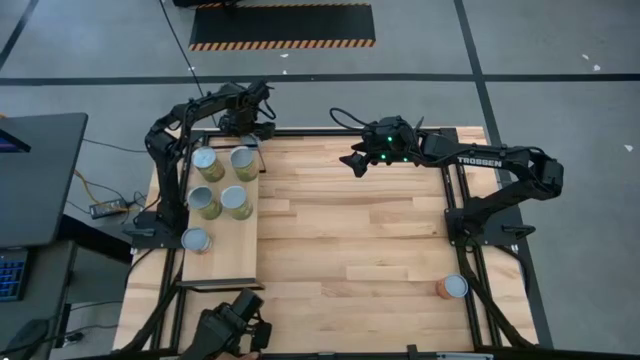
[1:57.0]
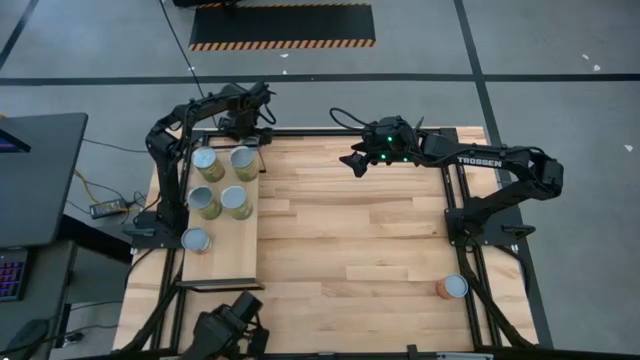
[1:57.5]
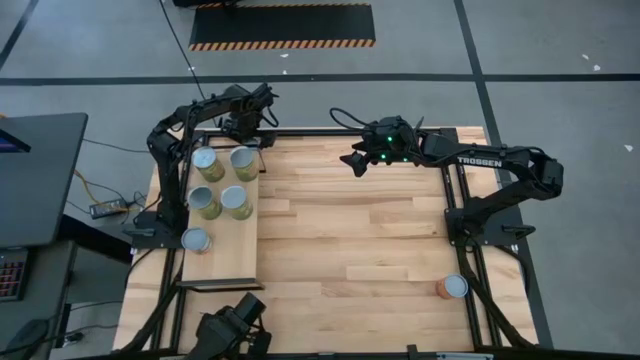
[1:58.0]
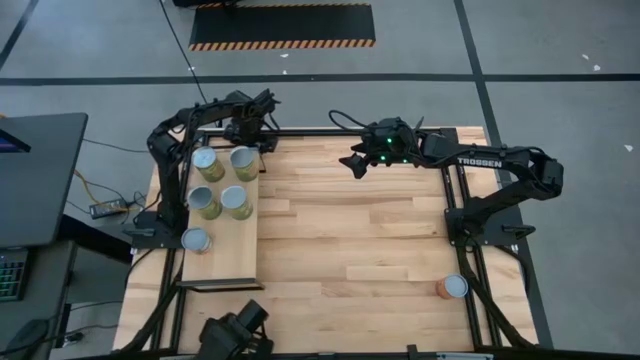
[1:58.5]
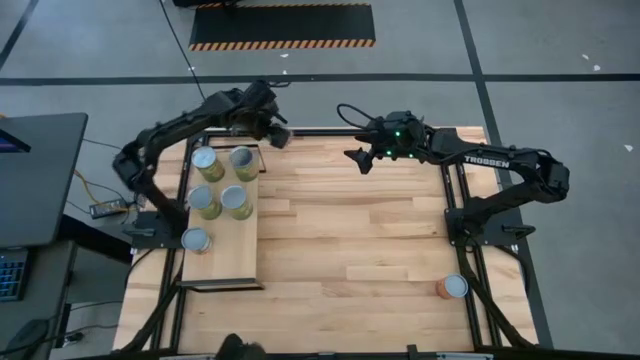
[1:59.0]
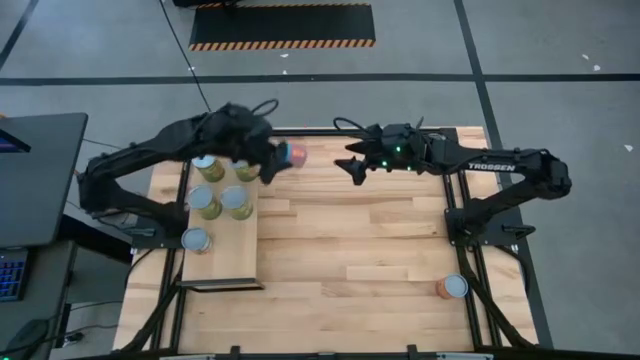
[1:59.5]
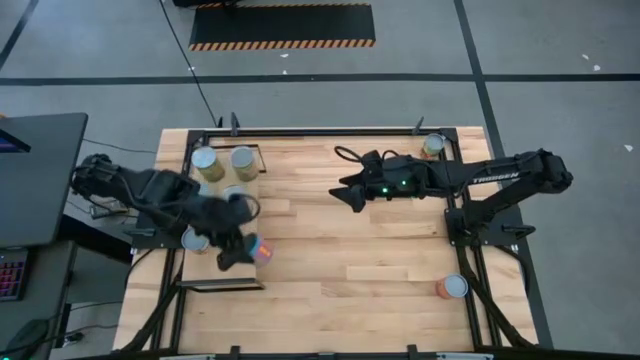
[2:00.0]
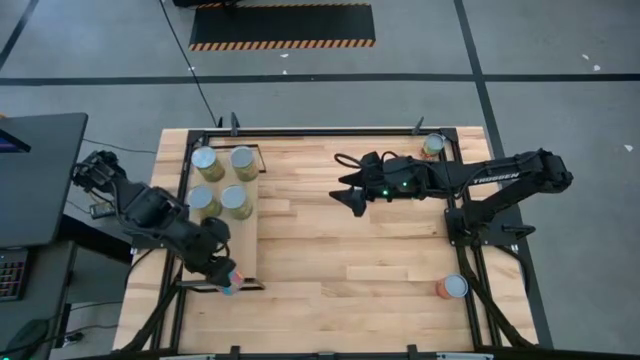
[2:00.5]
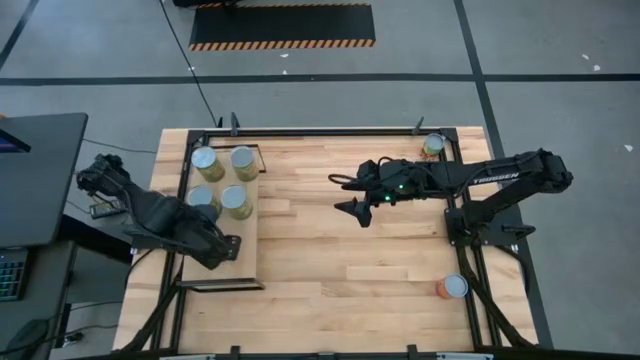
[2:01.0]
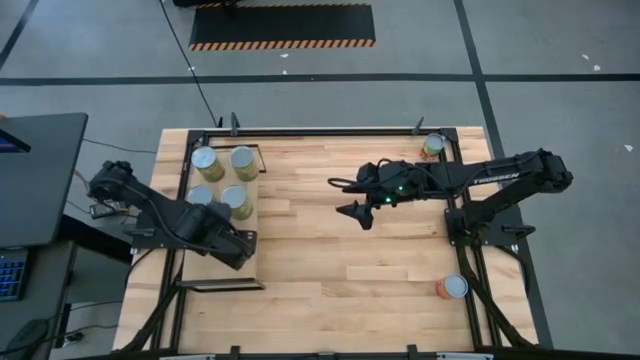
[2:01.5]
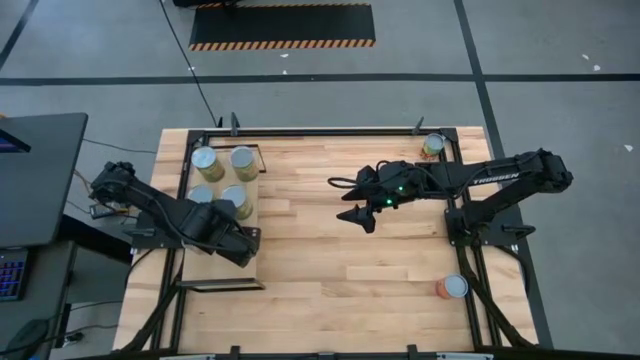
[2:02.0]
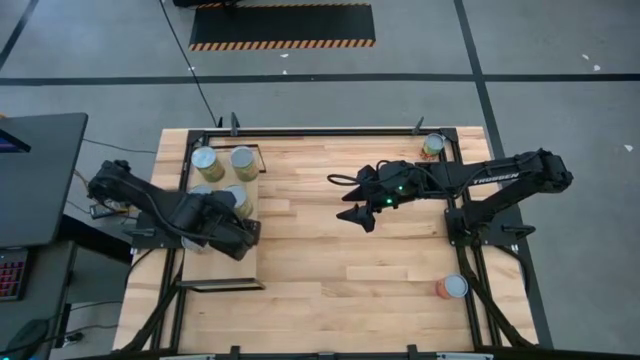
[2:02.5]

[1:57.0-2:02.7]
Task: Pick and place cans onto a shelf
Put the canned corn on the shelf

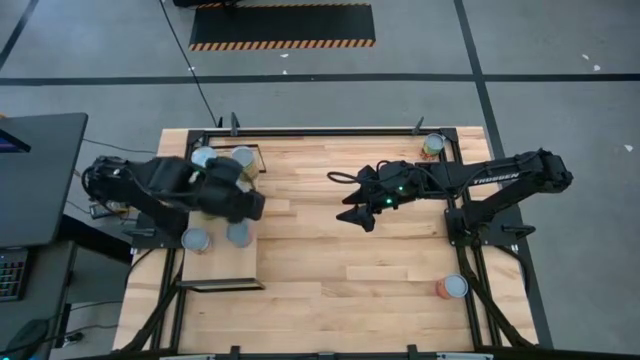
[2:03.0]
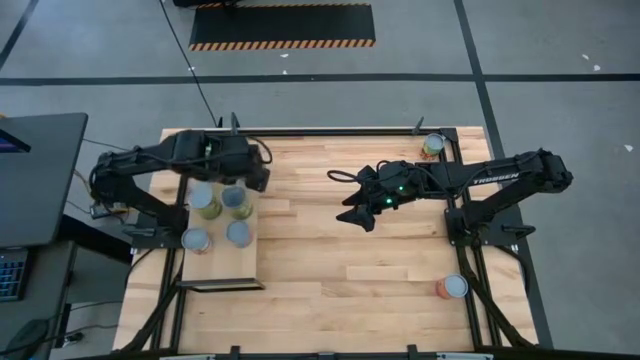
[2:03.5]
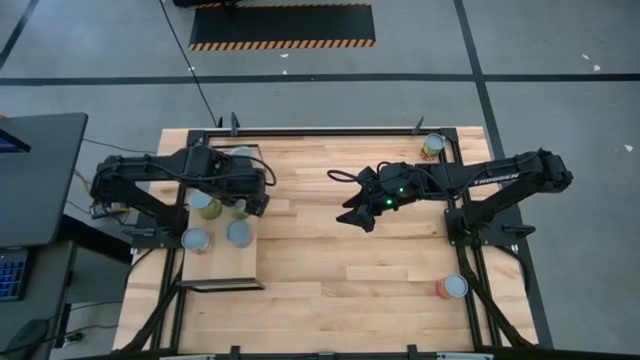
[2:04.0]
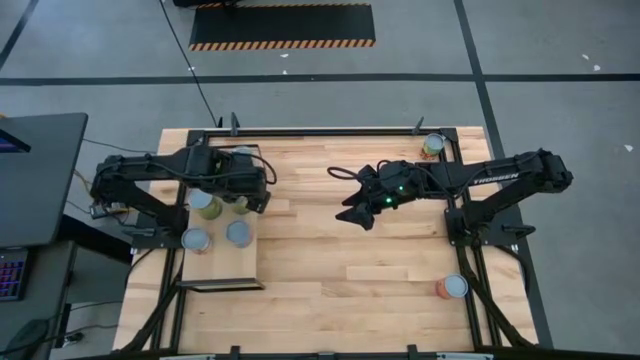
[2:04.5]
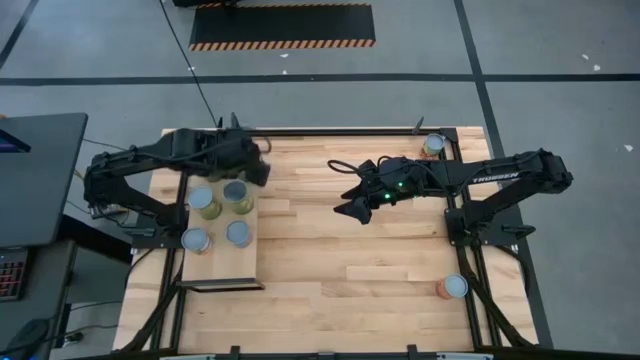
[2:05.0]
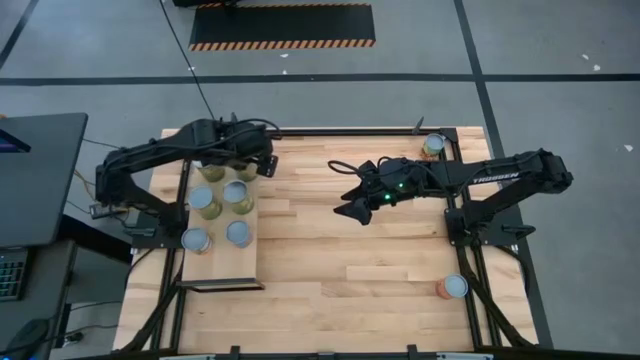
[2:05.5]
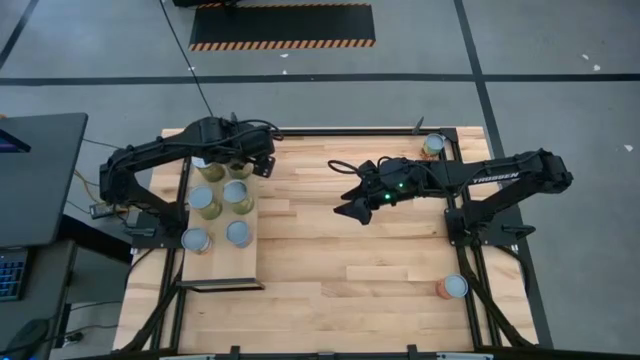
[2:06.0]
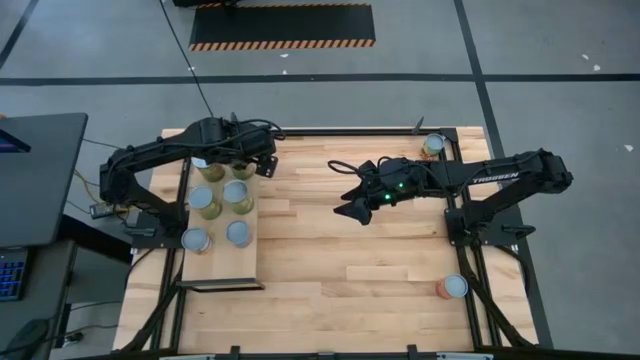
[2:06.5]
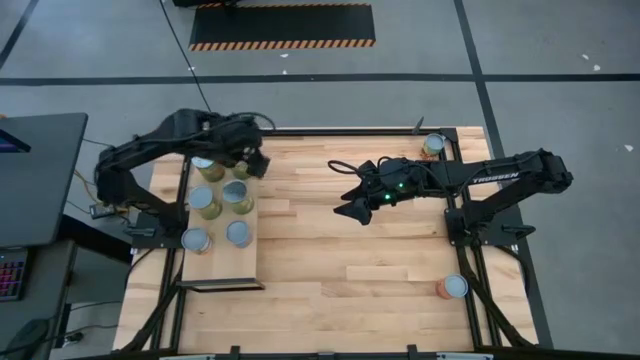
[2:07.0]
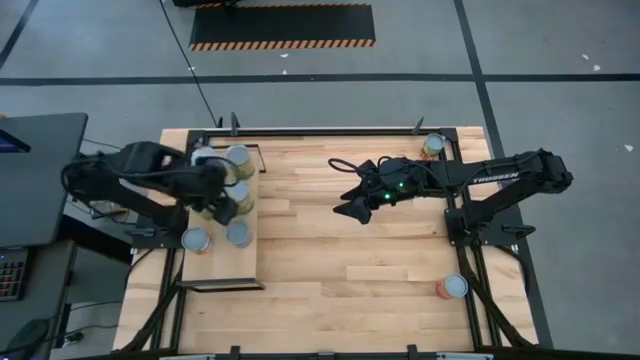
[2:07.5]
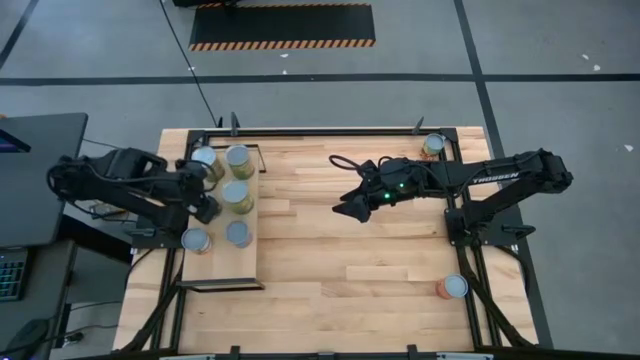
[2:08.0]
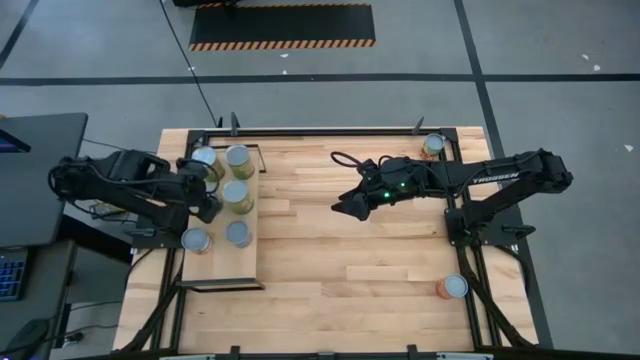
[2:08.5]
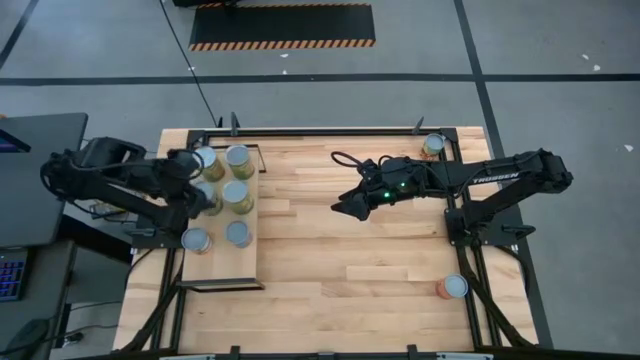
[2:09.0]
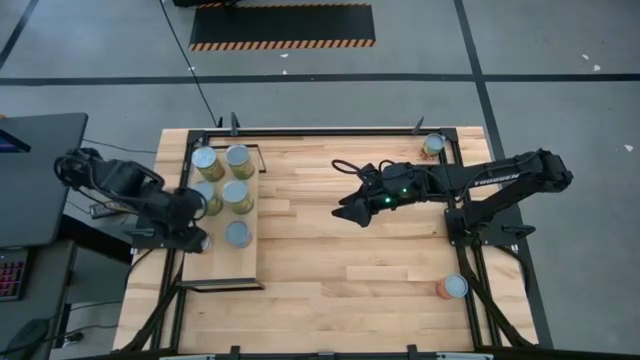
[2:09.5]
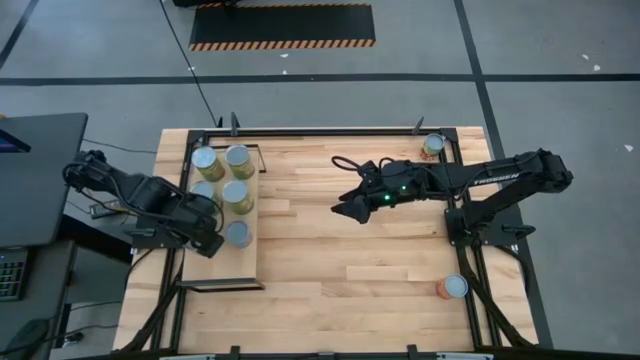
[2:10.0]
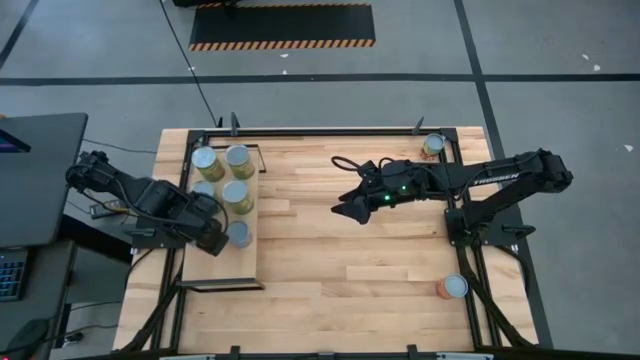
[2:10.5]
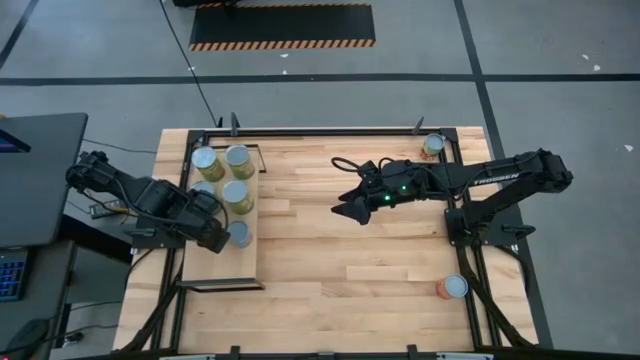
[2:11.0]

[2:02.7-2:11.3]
Adjust the cans on the shelf

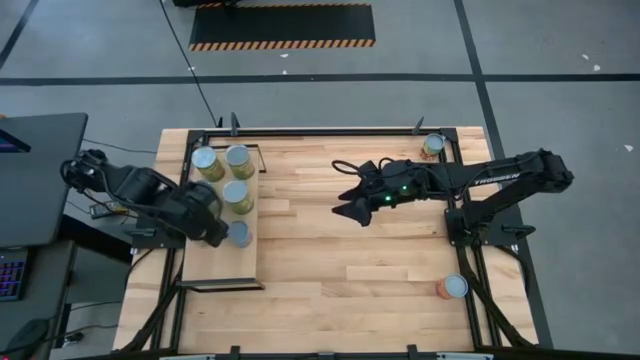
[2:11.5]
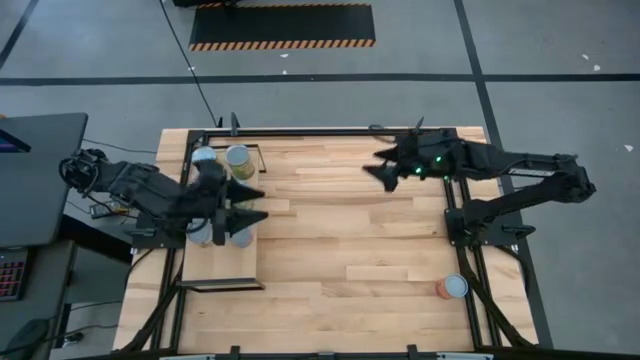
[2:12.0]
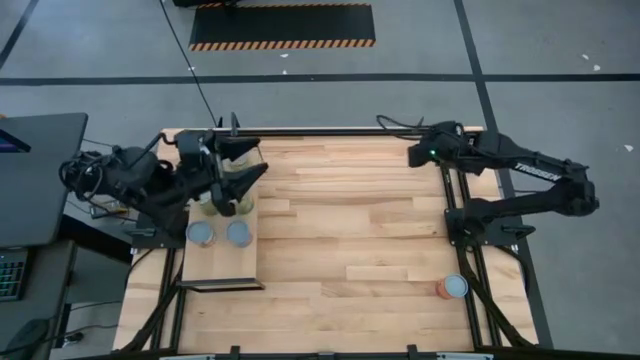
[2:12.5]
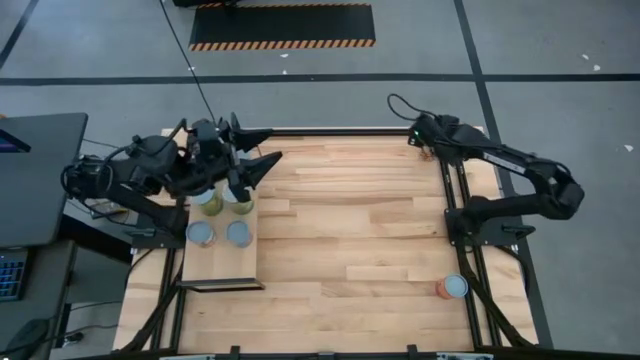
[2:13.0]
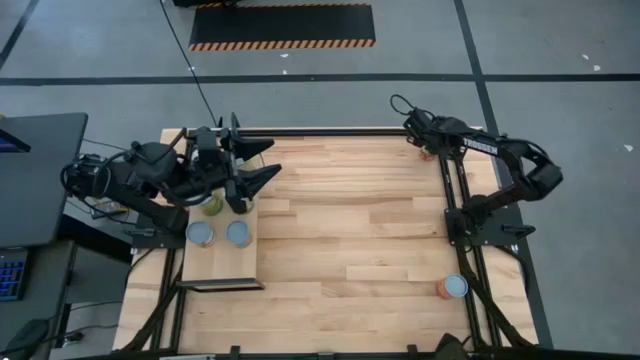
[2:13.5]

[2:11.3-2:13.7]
Put the canned spaghetti sauce on the shelf

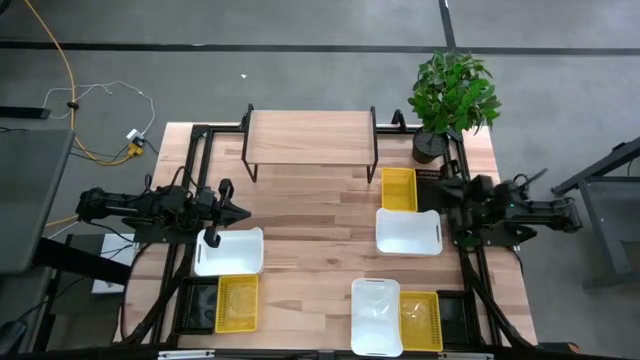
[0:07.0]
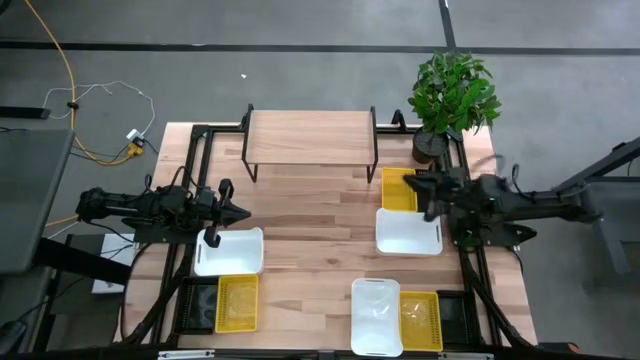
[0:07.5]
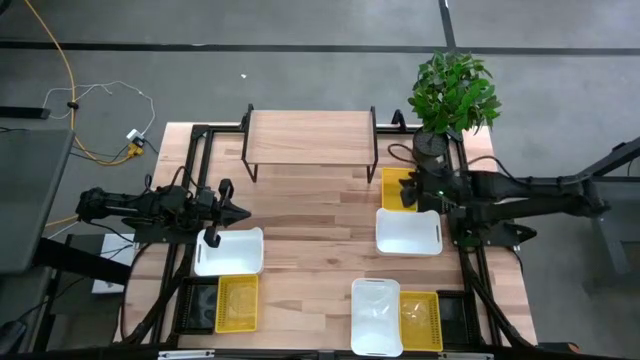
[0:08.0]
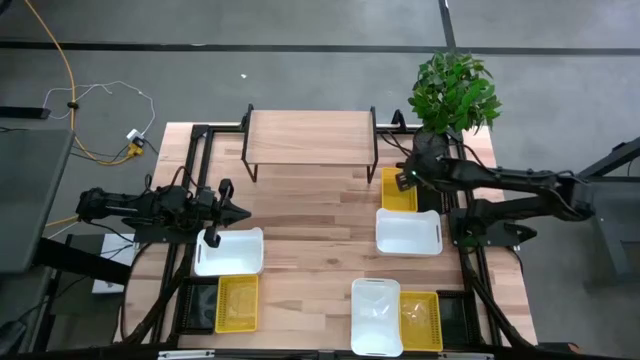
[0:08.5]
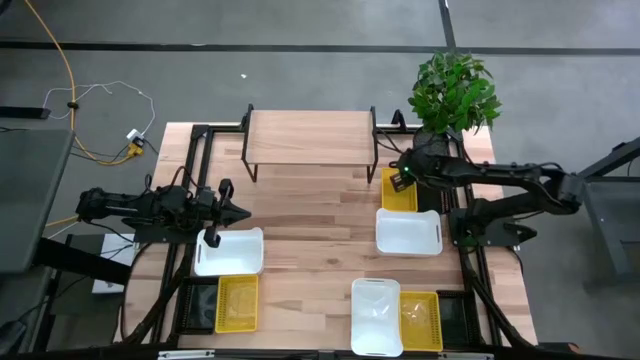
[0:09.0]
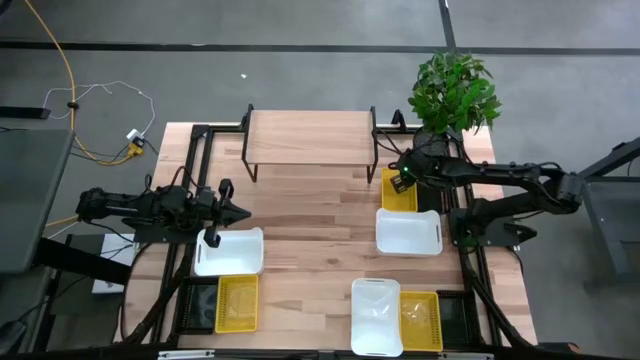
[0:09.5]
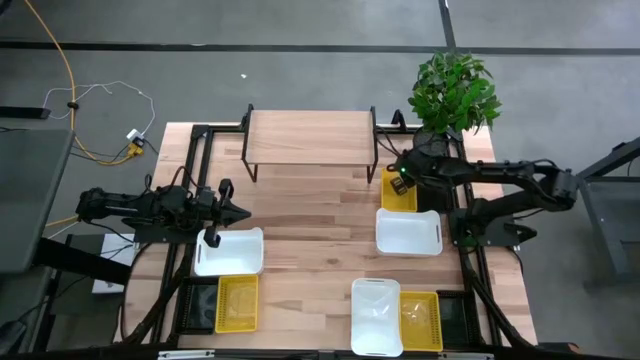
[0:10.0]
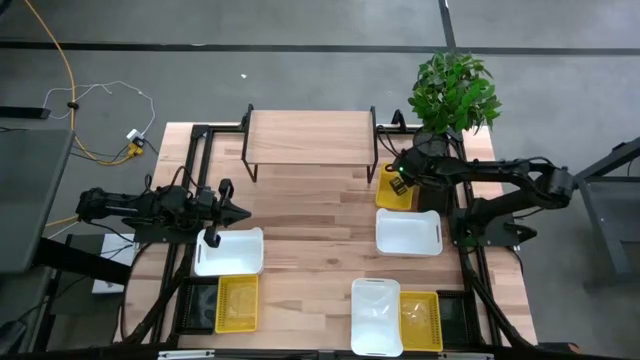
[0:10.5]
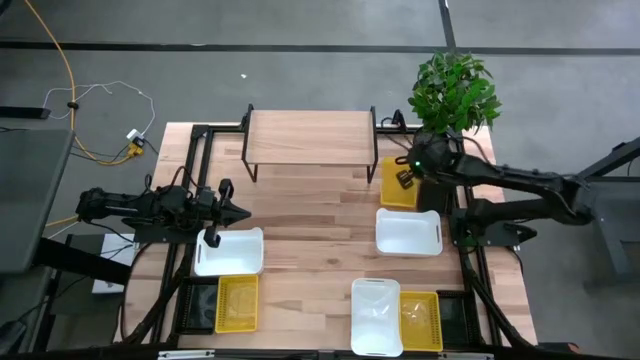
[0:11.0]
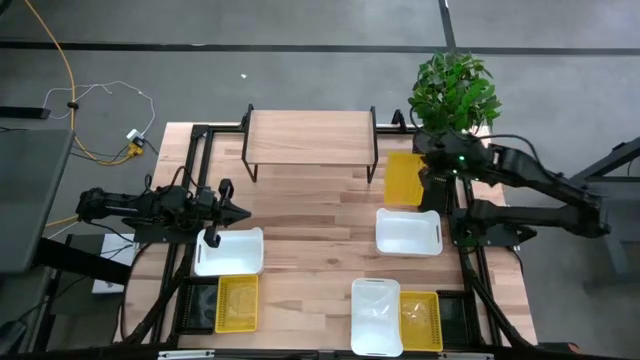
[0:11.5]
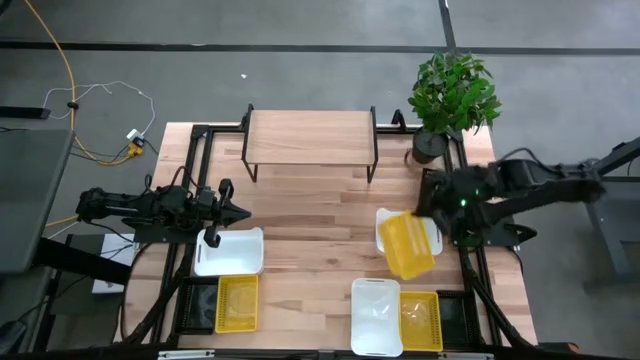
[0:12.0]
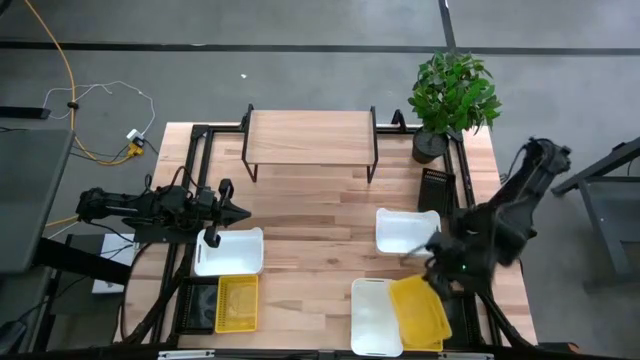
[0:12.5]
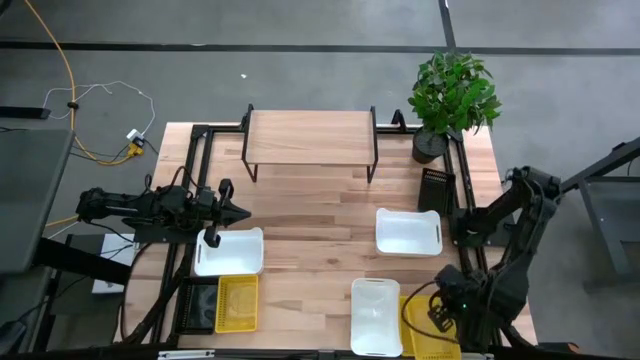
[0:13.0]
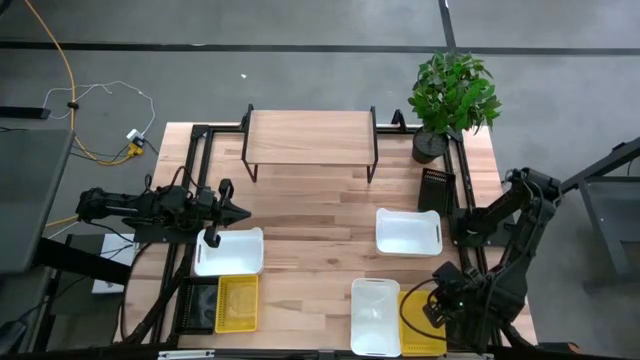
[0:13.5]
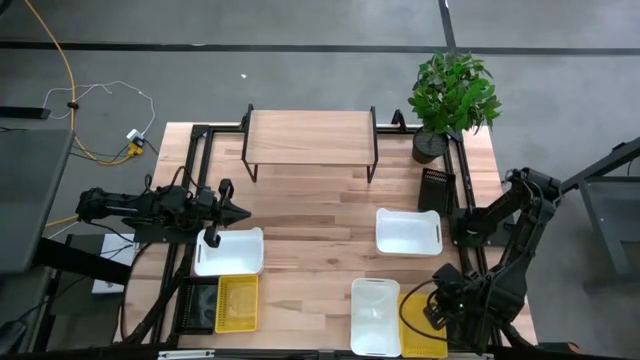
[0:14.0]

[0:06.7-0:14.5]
Task: Stack baskets on shelf by color
Stack the top yellow bin on the bottom right yellow bin
